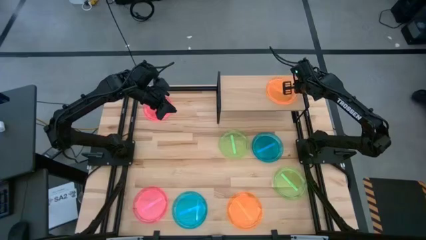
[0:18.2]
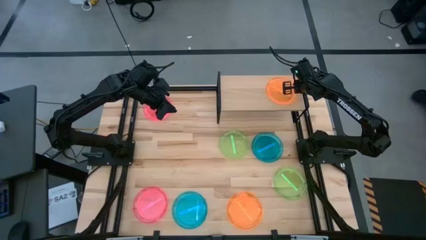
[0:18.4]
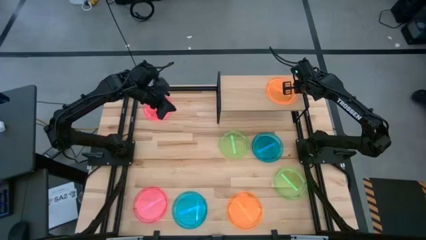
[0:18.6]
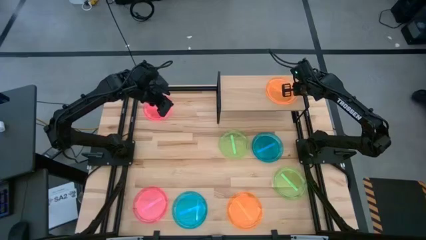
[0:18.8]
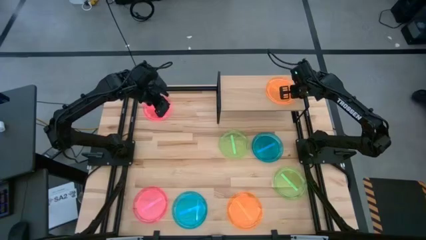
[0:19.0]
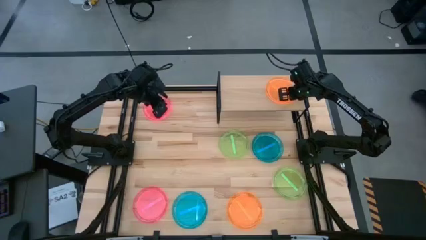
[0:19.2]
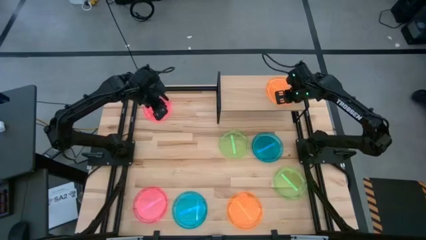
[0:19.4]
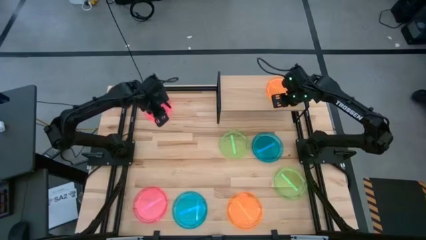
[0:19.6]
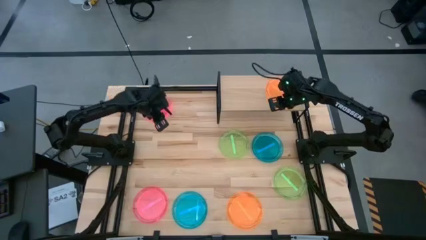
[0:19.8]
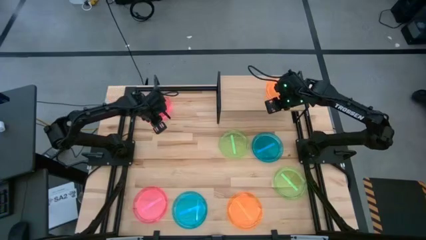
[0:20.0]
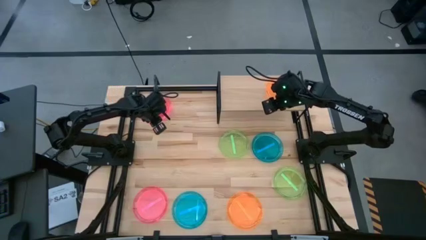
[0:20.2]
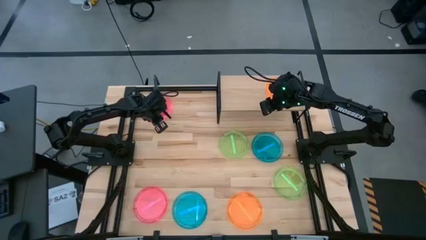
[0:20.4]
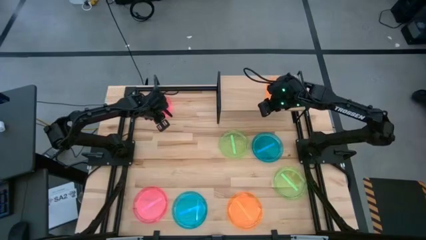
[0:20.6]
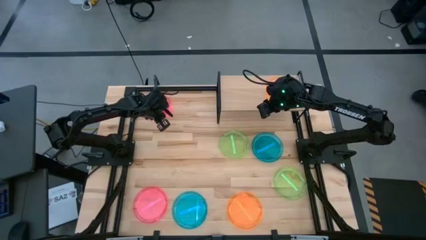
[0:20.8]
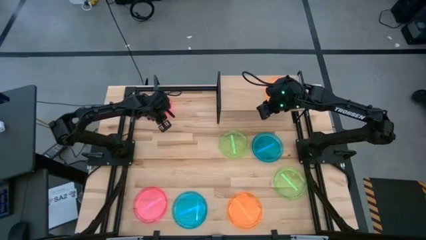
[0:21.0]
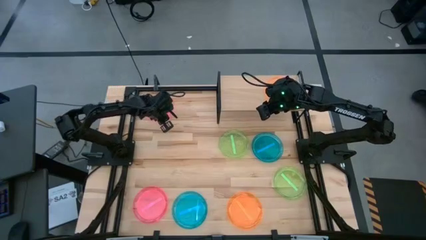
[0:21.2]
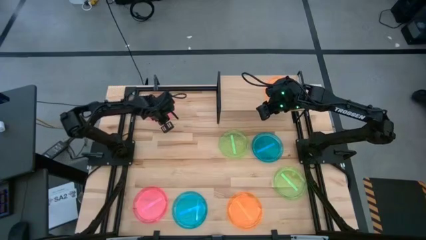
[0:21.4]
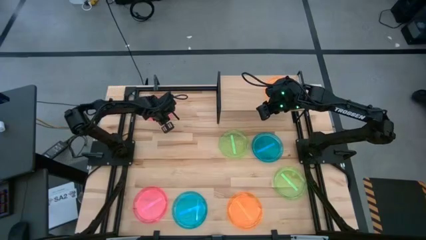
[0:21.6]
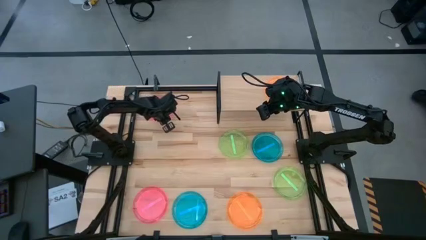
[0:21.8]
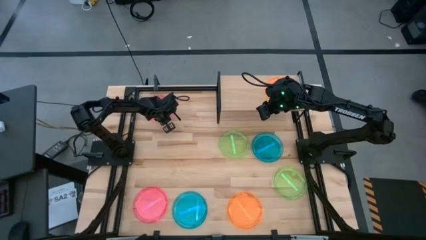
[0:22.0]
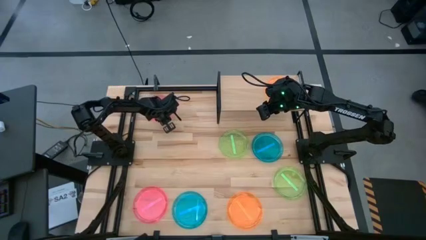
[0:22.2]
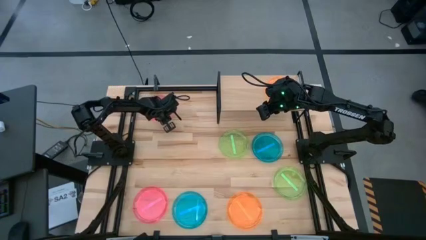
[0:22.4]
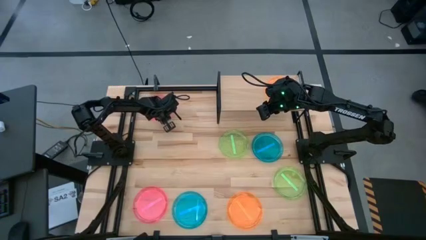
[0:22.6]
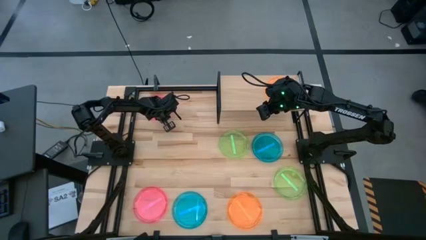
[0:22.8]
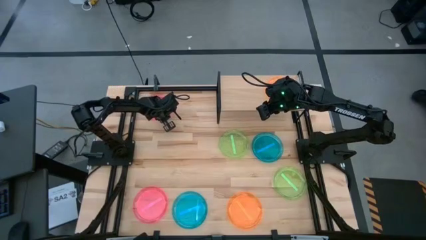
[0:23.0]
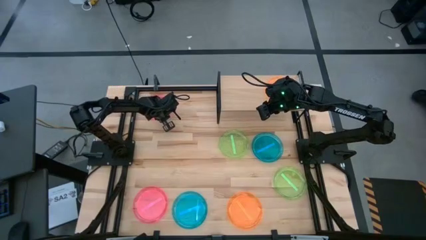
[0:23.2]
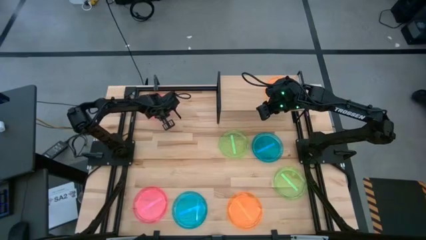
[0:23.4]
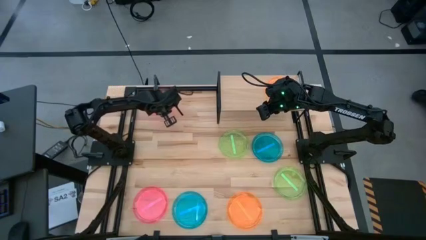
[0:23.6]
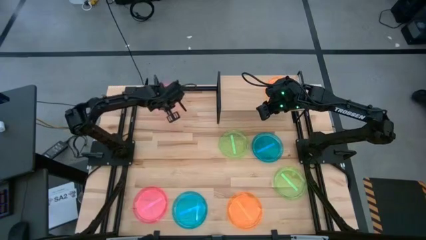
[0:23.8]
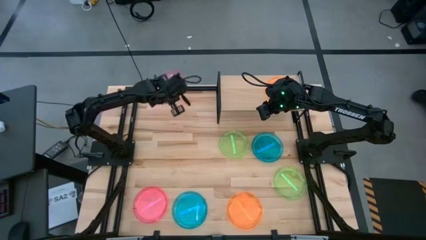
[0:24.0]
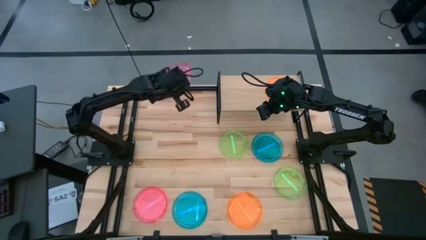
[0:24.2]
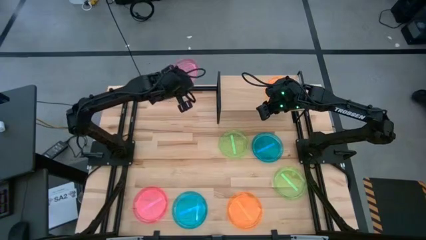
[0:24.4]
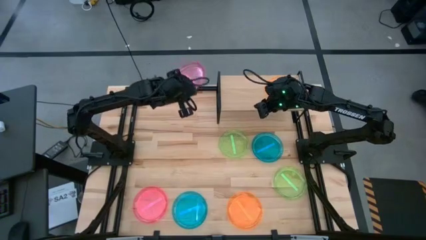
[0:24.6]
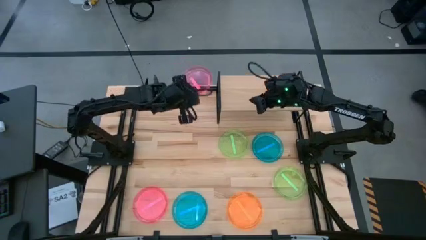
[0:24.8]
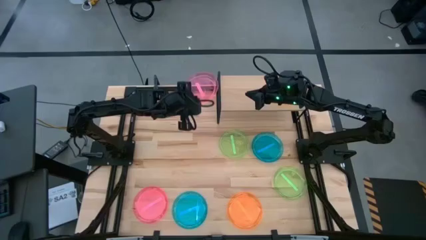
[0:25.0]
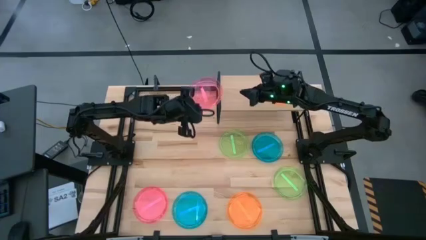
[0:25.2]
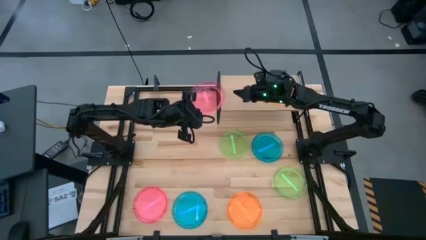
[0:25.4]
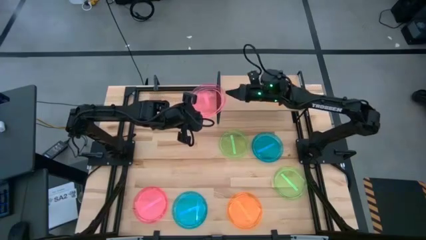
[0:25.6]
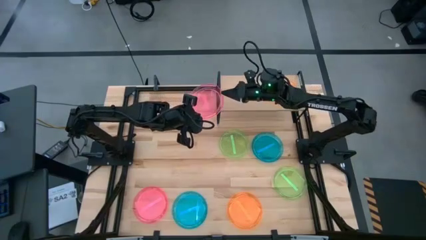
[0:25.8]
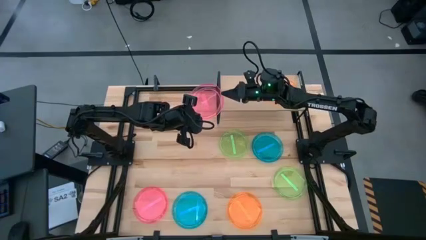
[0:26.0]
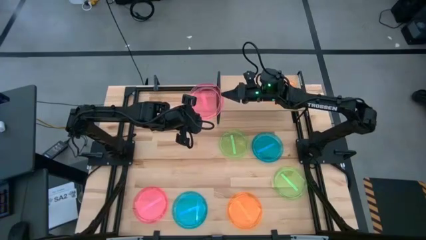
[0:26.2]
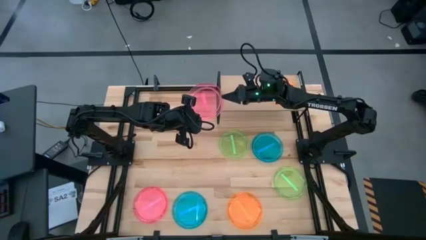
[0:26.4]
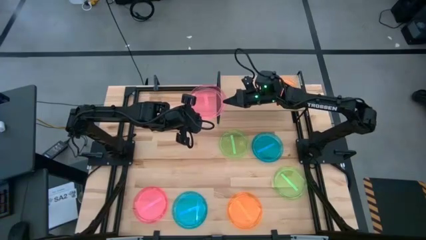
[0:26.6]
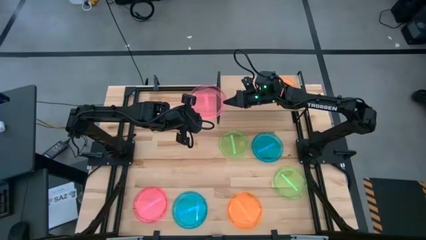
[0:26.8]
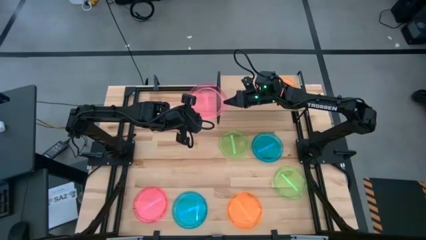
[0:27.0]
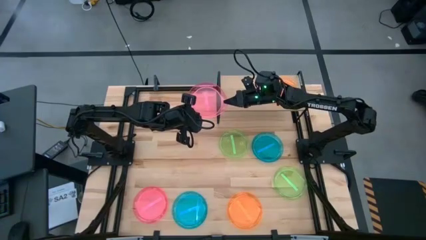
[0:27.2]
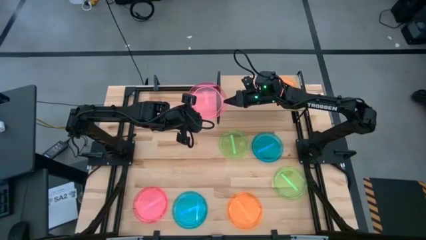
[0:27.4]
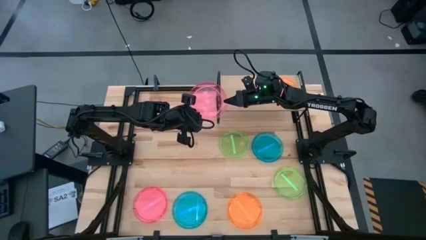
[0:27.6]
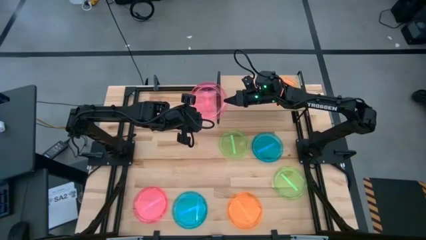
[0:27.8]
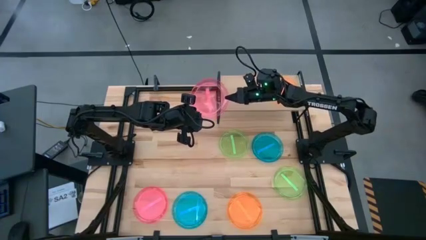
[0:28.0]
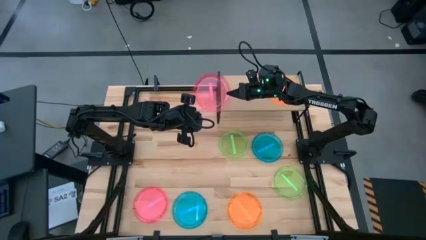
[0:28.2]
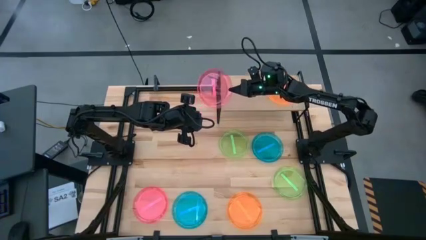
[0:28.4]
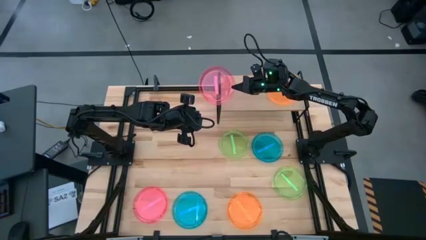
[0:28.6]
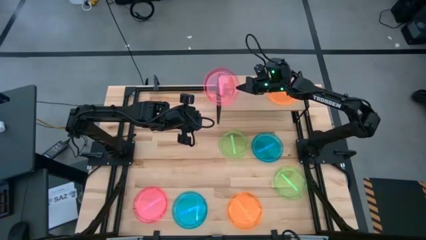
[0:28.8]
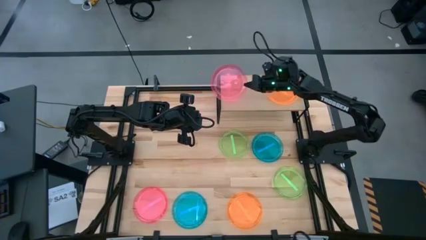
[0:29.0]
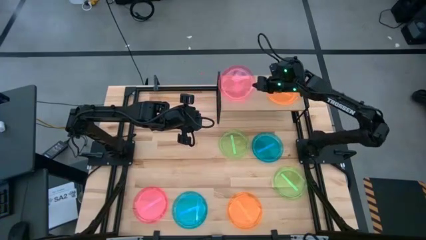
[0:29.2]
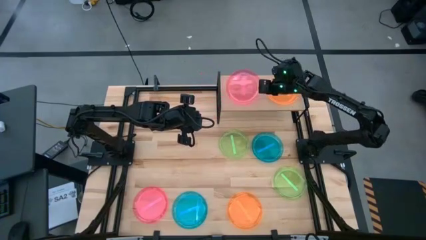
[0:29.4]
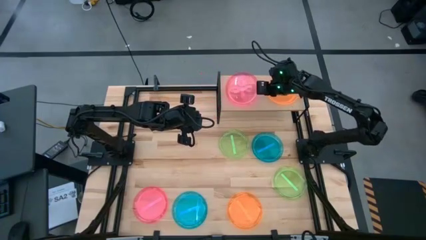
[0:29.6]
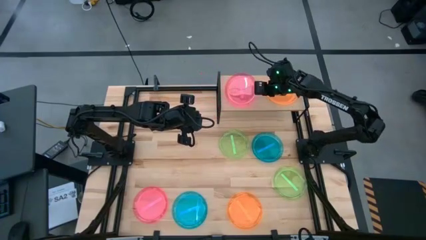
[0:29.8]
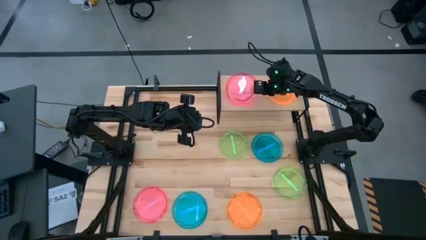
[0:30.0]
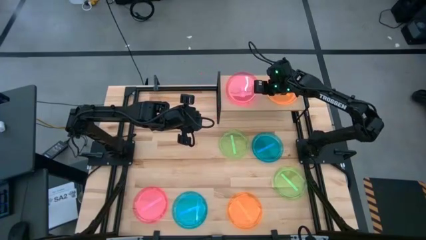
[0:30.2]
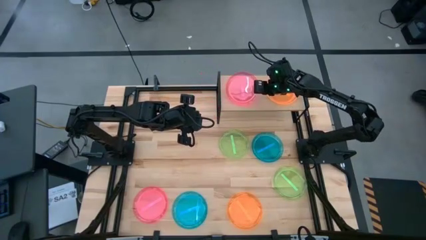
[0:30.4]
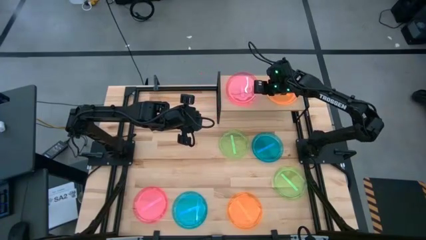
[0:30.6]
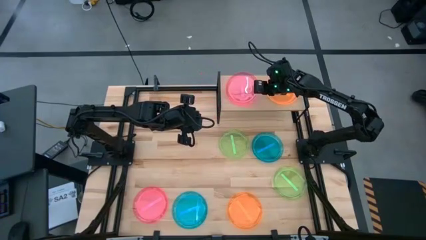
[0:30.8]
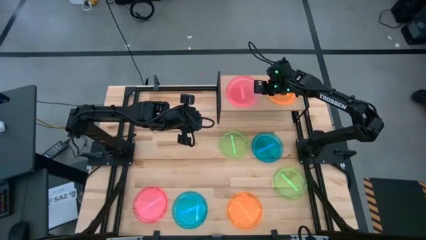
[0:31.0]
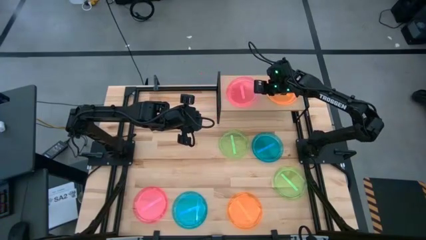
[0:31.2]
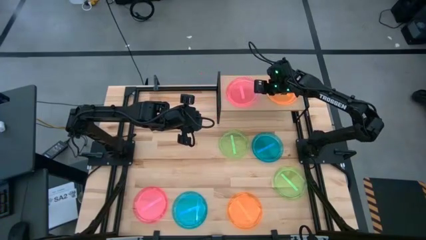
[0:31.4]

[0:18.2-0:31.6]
Task: Place and stack plates onto a shelf
Put the top pink plate on the shelf
